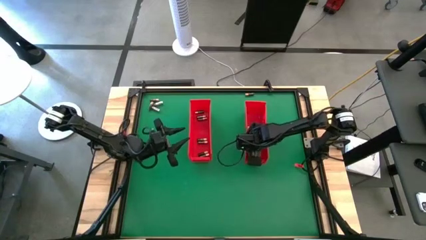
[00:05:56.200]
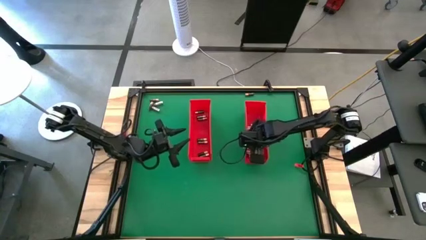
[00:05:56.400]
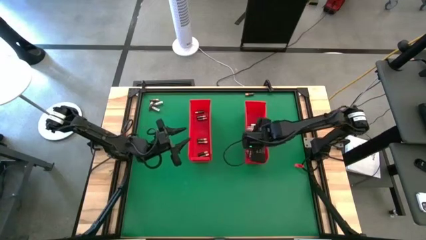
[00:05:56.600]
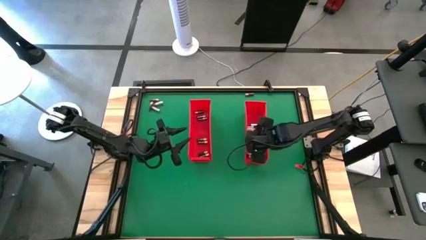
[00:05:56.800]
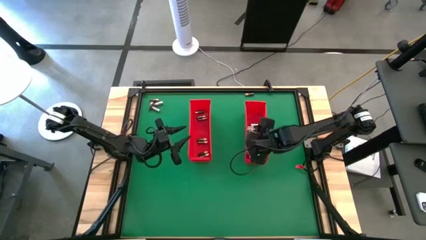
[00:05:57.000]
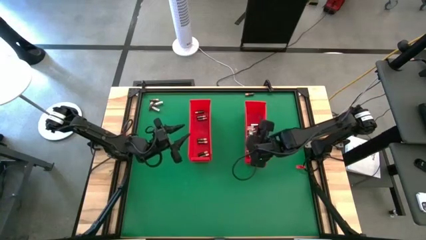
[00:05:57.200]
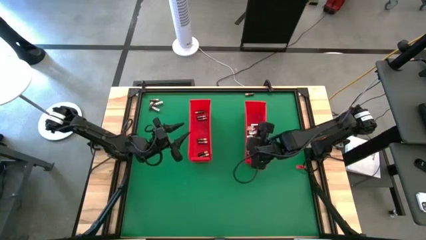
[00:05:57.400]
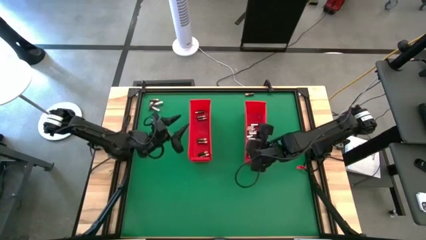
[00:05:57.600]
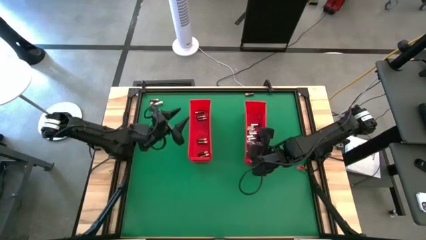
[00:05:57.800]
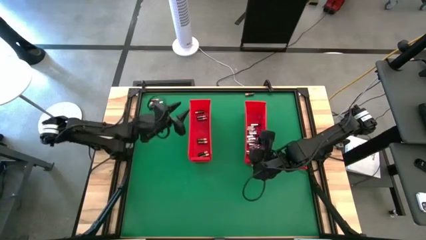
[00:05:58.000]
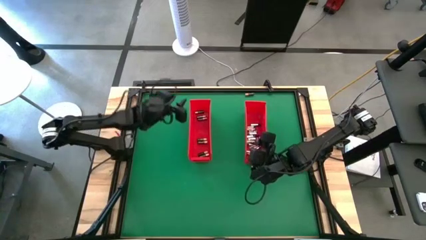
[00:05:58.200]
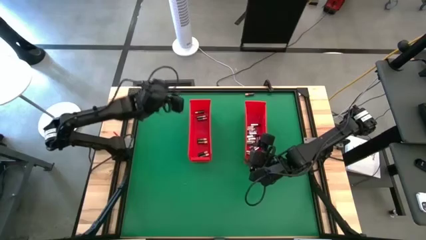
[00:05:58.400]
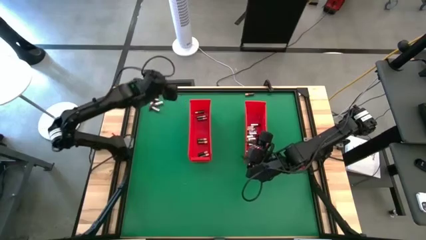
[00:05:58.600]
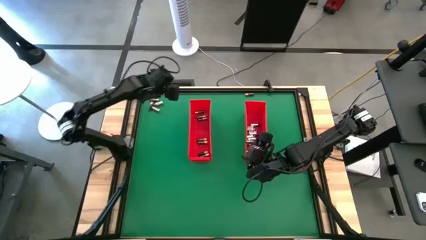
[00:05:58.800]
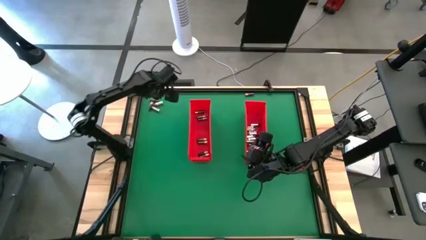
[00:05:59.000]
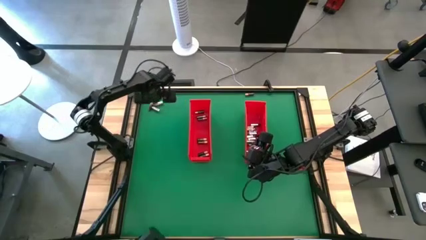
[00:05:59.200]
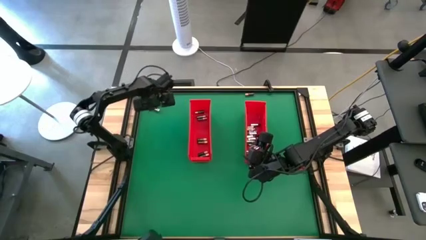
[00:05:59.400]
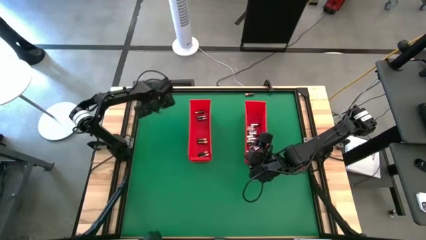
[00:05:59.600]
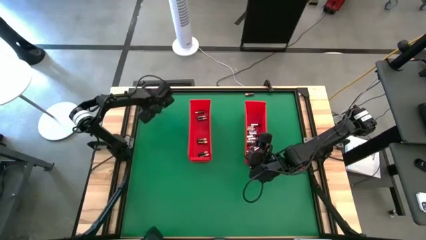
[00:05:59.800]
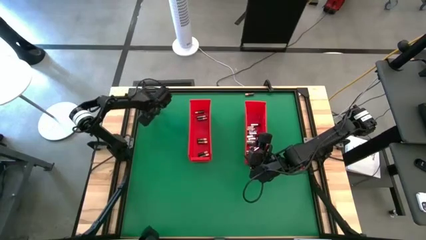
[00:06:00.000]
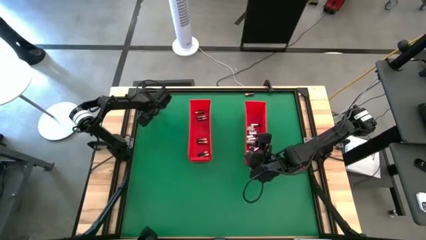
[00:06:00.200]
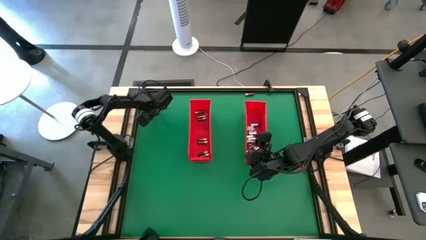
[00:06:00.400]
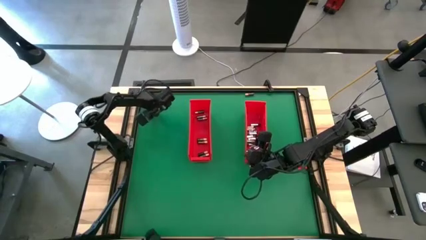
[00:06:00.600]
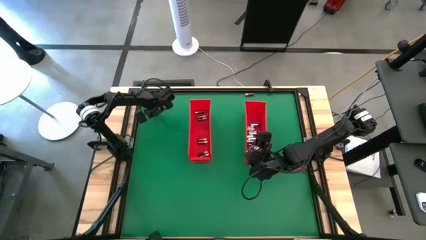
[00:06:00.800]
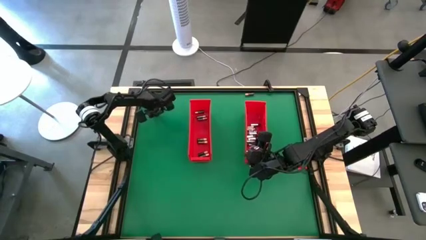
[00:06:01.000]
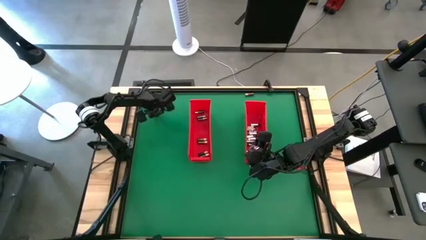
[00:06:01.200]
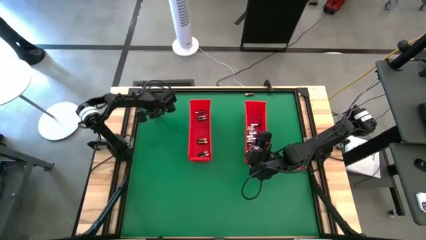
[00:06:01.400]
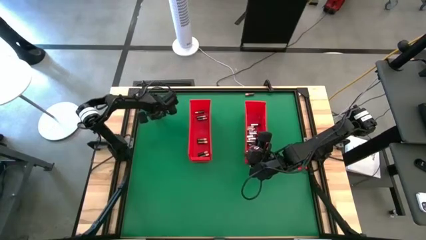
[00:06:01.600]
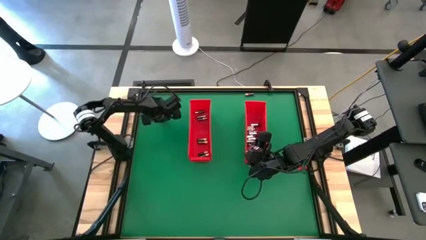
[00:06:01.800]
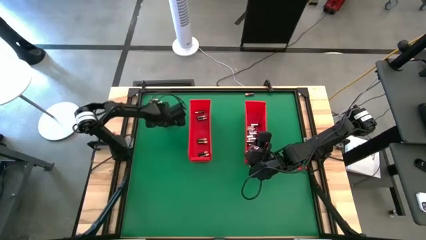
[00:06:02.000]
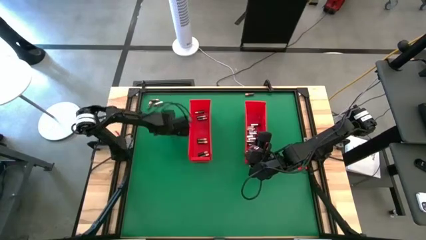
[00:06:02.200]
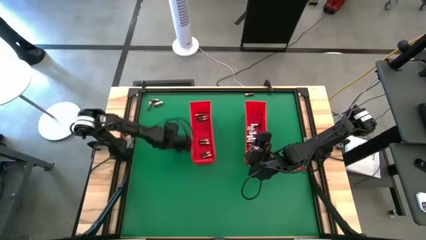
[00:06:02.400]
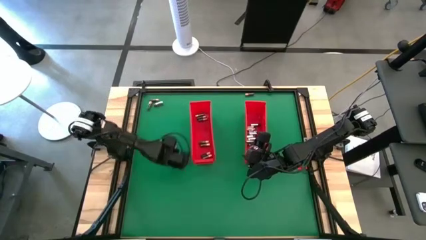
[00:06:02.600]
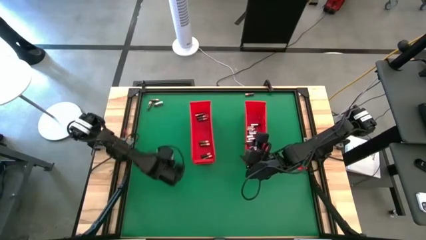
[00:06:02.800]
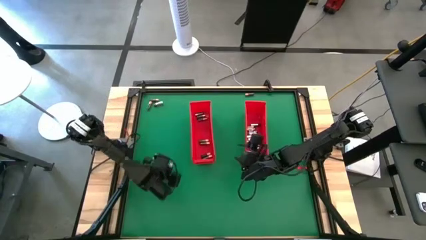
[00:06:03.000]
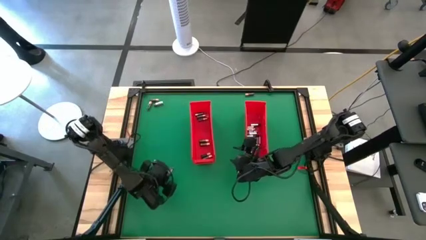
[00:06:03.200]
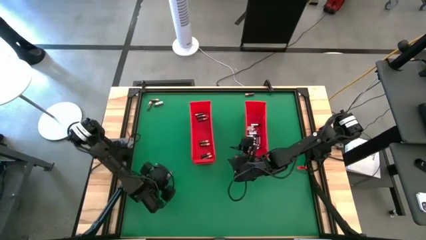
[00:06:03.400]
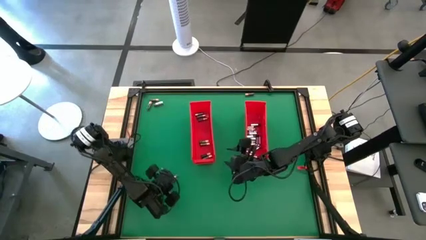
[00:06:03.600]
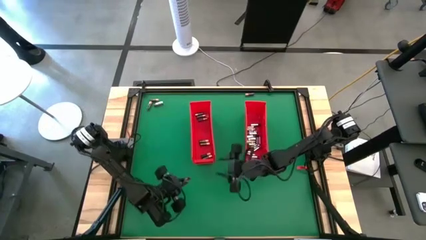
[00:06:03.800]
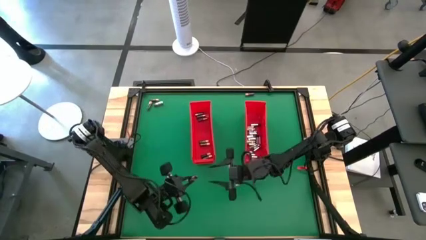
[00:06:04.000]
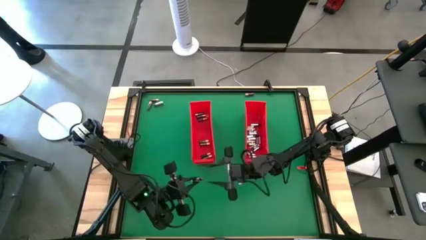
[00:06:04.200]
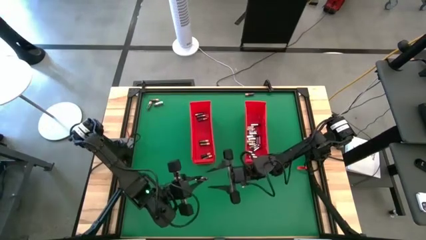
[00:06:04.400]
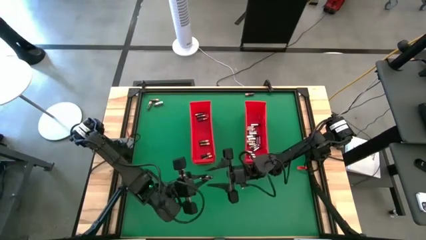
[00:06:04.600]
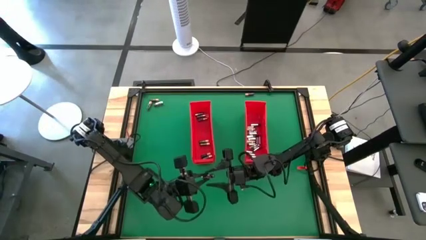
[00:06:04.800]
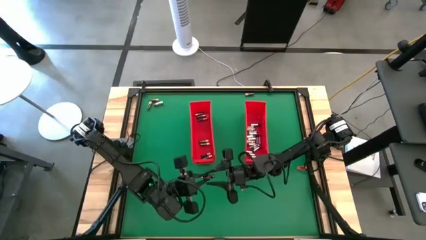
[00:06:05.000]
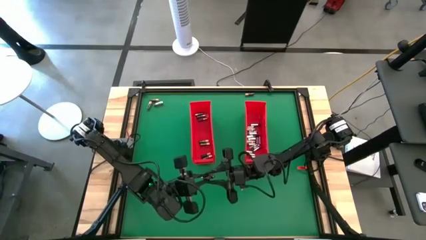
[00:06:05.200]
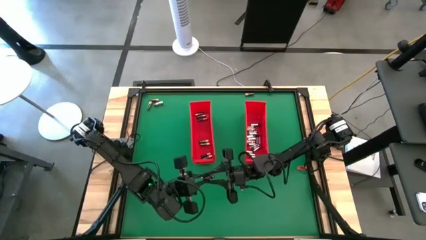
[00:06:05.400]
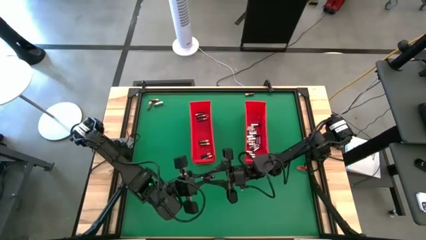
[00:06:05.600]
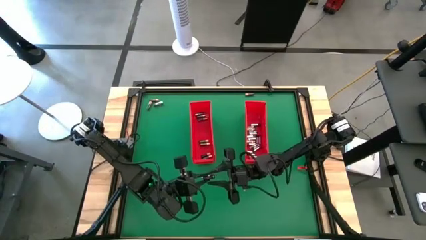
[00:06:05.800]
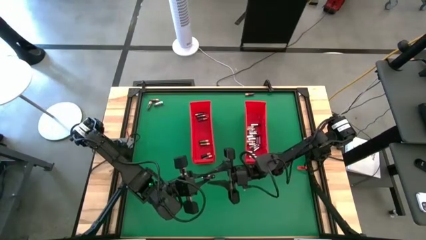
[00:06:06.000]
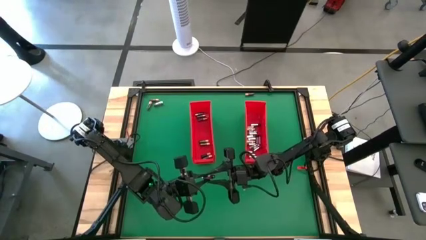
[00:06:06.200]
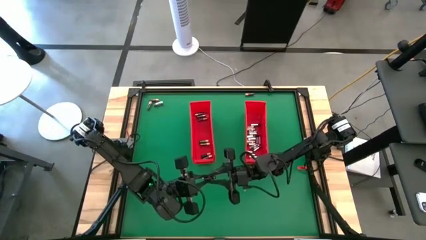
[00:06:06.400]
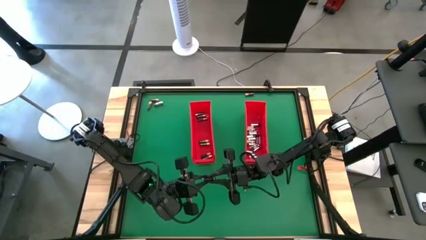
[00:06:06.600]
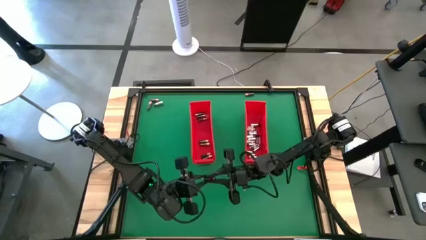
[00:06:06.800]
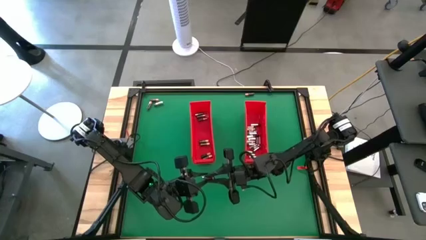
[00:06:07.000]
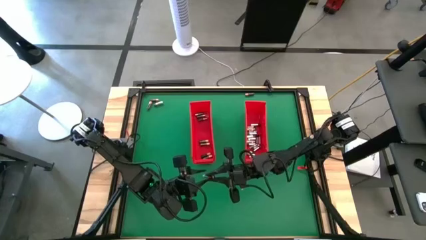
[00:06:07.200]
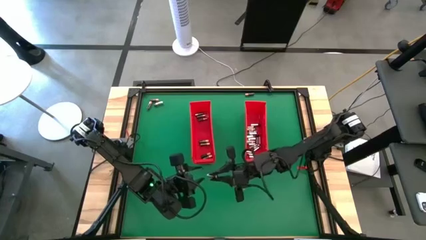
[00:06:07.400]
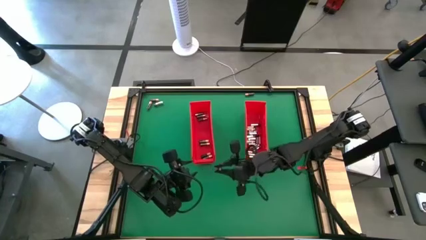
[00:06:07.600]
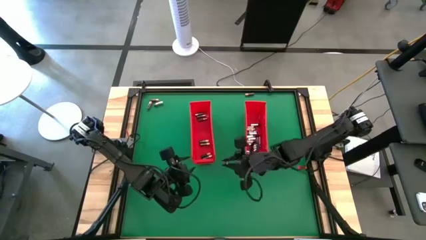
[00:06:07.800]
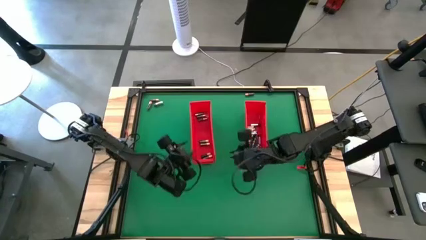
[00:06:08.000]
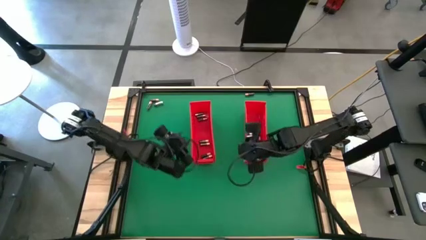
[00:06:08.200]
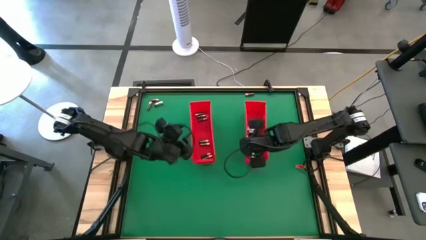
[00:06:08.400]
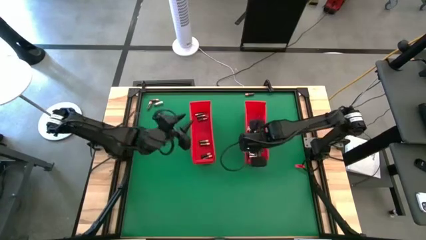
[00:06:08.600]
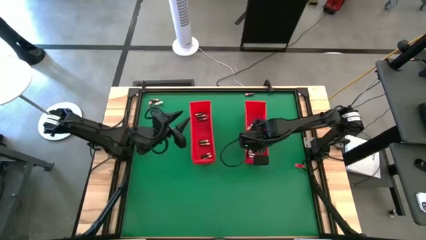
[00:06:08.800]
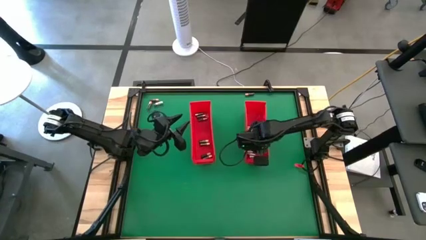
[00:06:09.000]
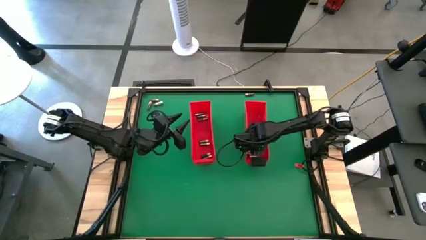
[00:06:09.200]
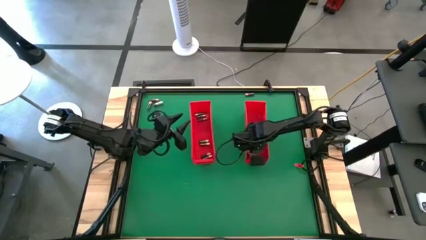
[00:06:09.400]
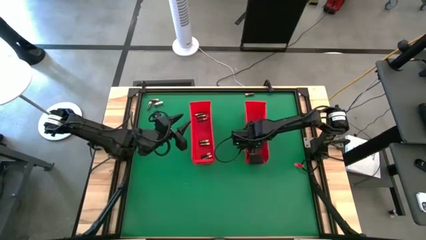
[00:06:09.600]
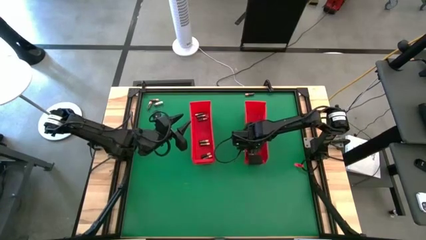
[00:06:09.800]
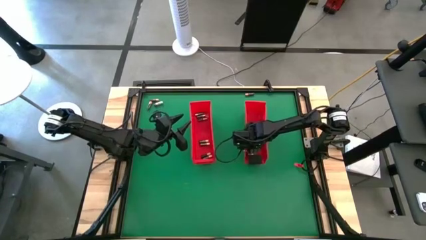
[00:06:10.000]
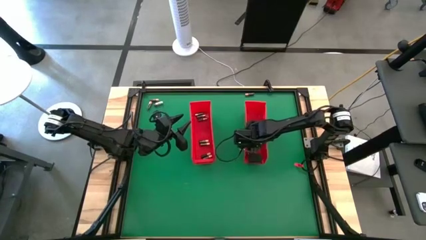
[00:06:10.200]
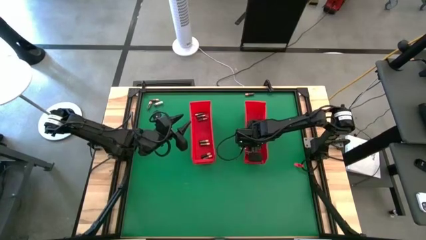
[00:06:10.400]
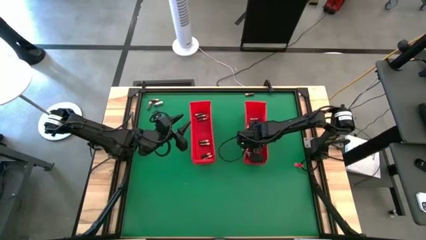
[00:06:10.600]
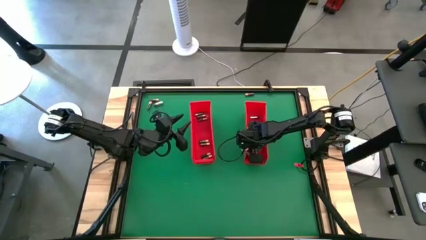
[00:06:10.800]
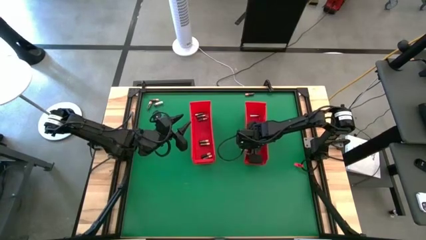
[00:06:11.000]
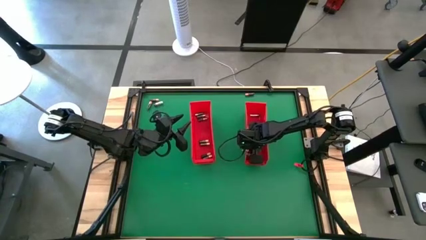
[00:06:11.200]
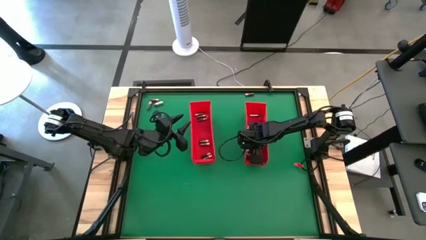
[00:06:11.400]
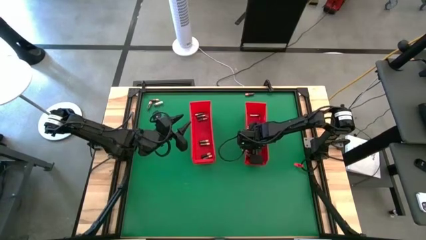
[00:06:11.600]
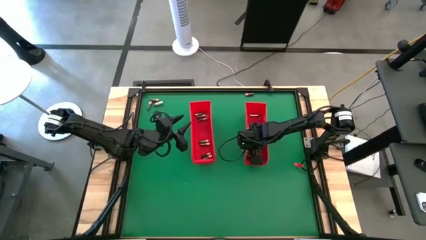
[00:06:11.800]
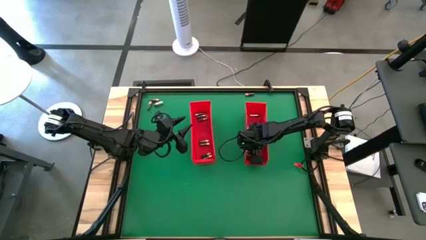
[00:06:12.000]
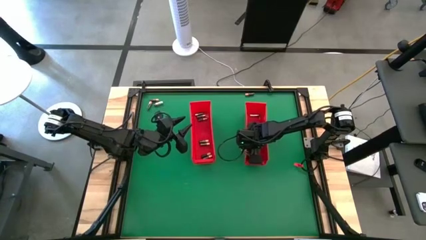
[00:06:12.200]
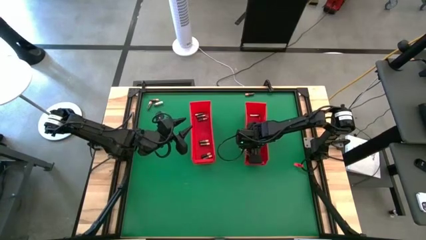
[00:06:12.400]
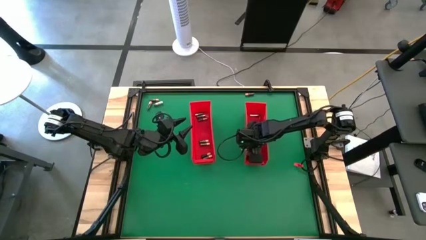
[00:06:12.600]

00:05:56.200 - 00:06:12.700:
Task: Sort batteries
Put the silver battery into the right red bin
